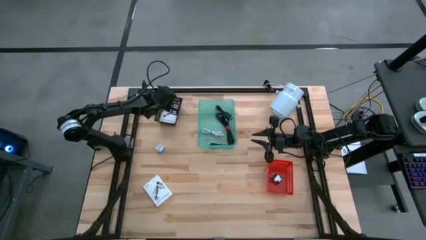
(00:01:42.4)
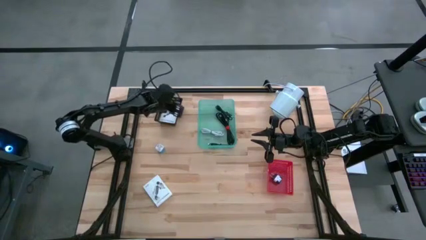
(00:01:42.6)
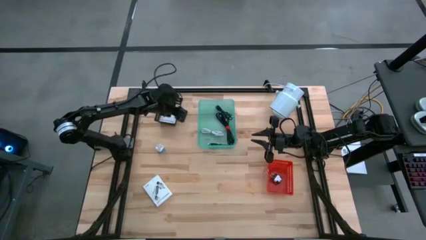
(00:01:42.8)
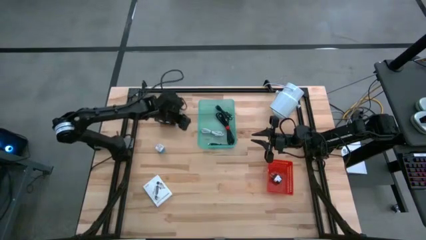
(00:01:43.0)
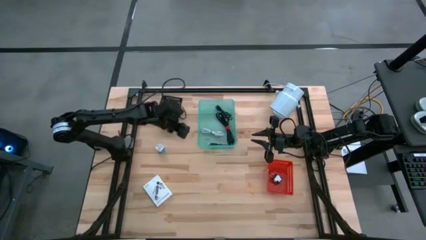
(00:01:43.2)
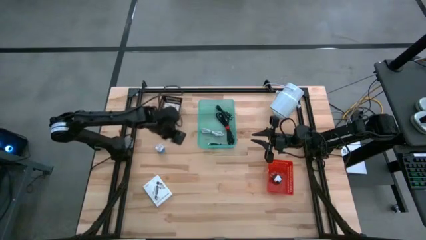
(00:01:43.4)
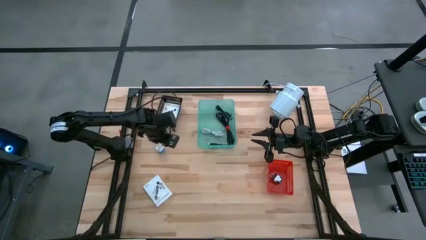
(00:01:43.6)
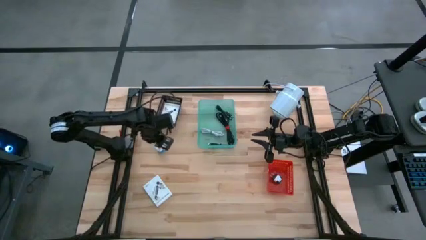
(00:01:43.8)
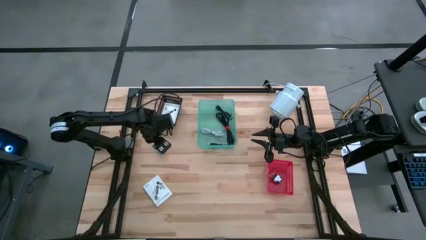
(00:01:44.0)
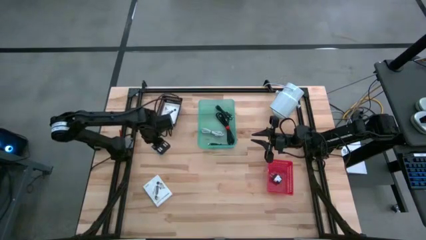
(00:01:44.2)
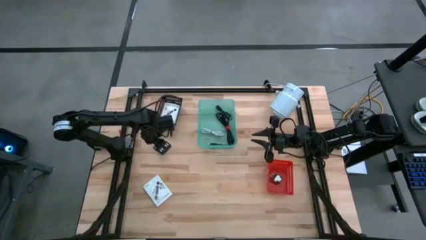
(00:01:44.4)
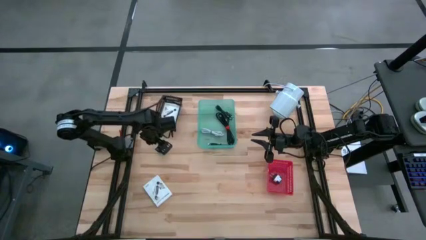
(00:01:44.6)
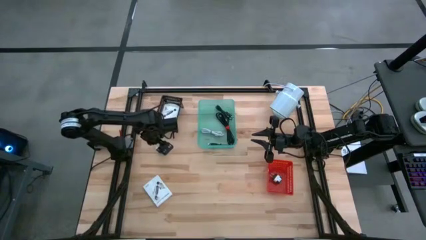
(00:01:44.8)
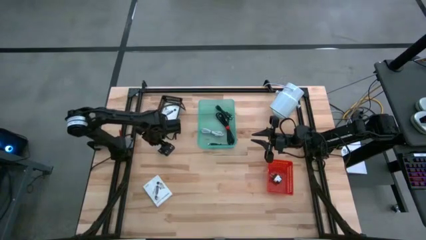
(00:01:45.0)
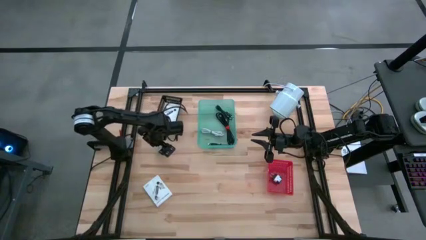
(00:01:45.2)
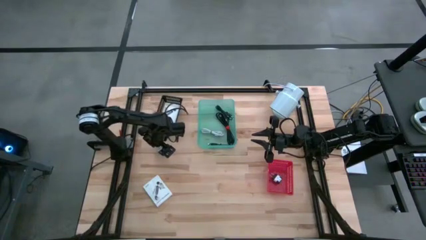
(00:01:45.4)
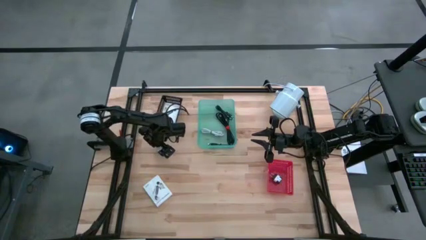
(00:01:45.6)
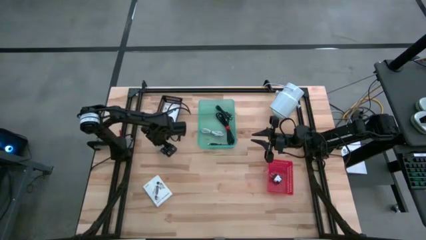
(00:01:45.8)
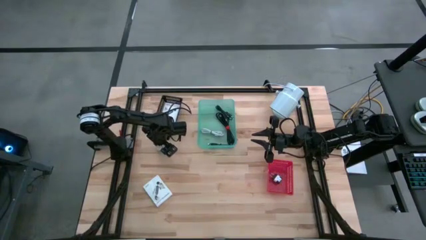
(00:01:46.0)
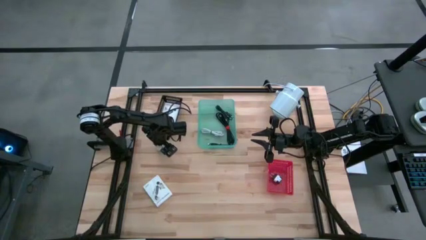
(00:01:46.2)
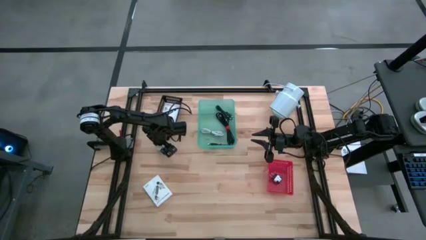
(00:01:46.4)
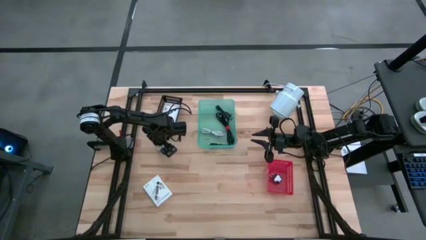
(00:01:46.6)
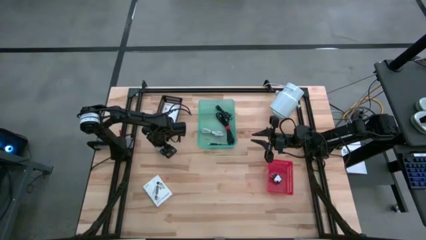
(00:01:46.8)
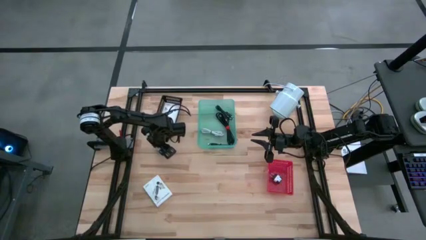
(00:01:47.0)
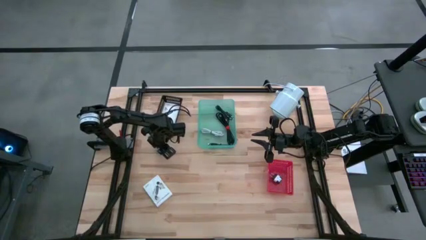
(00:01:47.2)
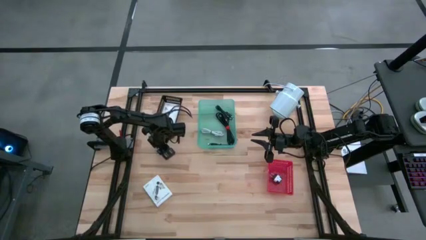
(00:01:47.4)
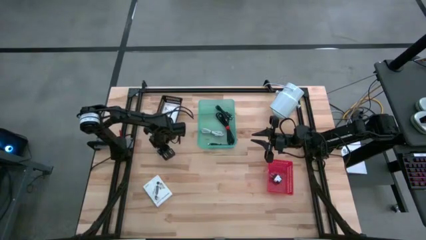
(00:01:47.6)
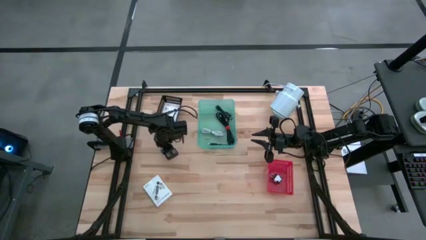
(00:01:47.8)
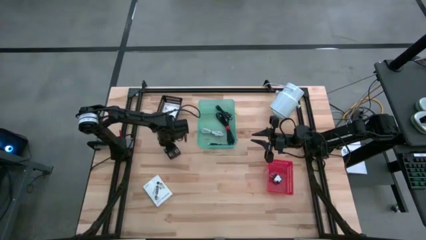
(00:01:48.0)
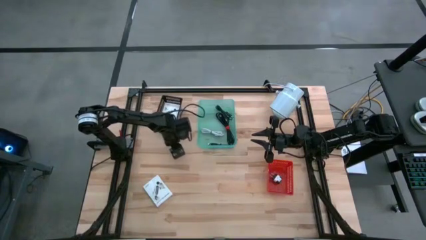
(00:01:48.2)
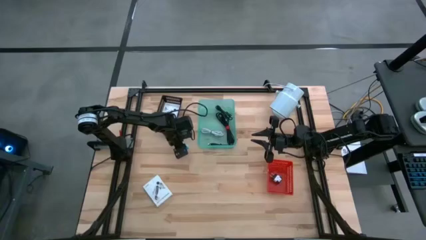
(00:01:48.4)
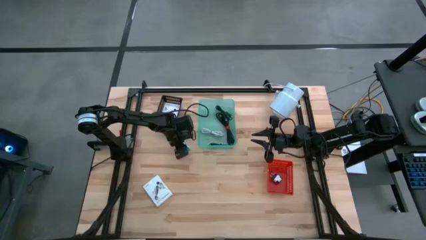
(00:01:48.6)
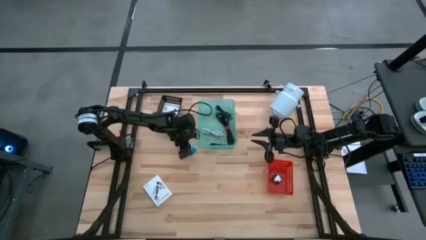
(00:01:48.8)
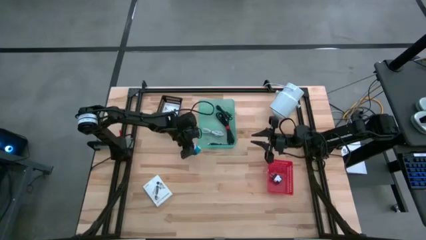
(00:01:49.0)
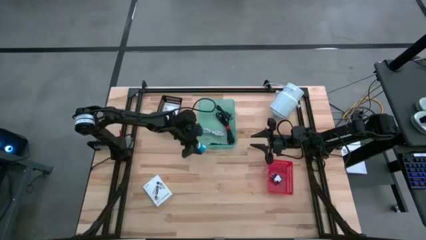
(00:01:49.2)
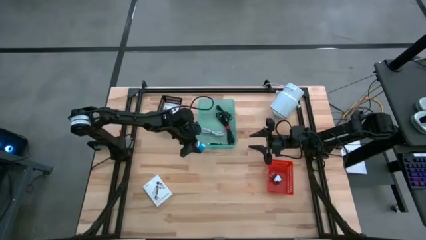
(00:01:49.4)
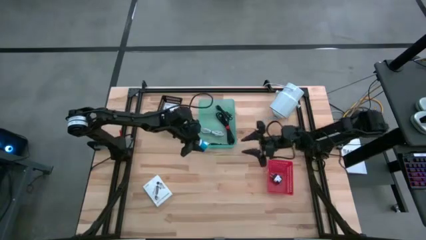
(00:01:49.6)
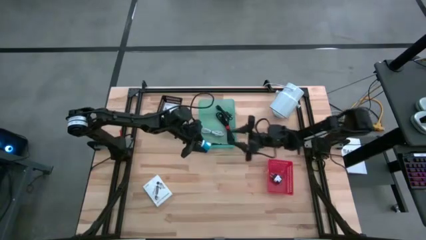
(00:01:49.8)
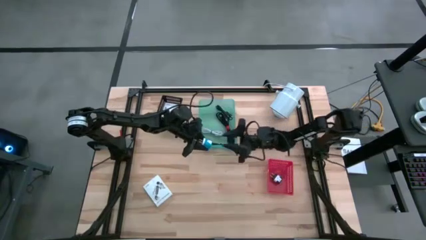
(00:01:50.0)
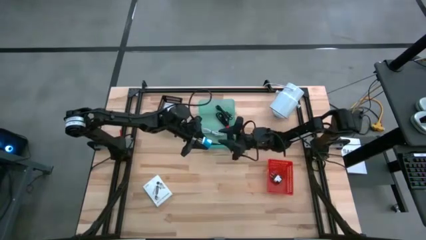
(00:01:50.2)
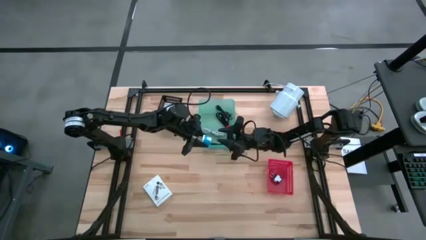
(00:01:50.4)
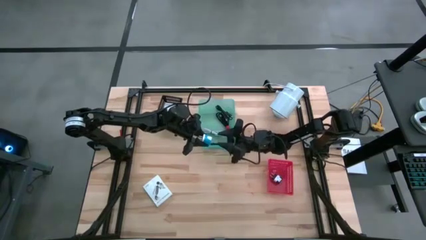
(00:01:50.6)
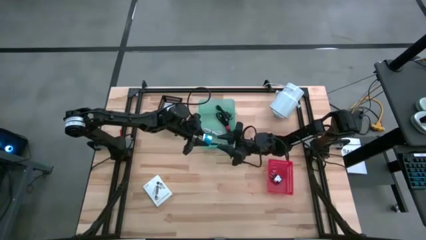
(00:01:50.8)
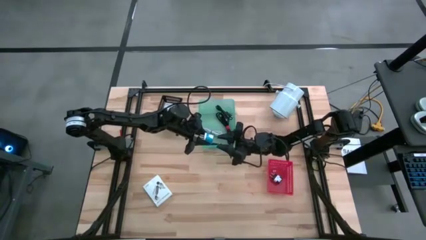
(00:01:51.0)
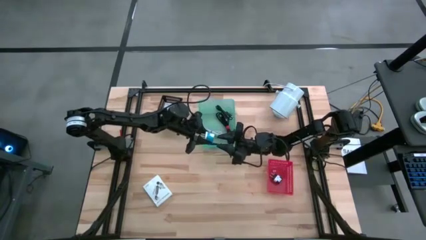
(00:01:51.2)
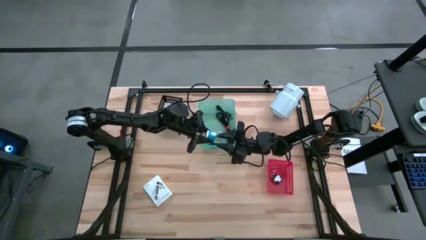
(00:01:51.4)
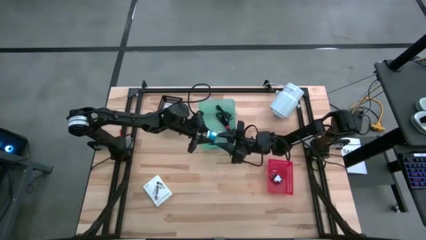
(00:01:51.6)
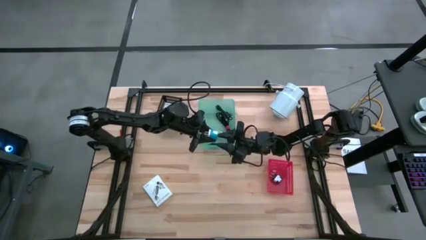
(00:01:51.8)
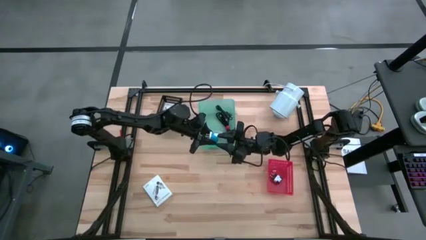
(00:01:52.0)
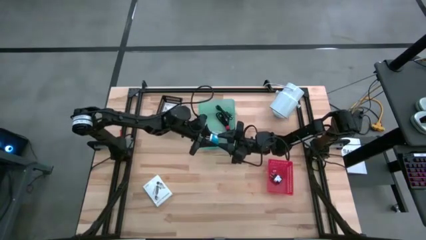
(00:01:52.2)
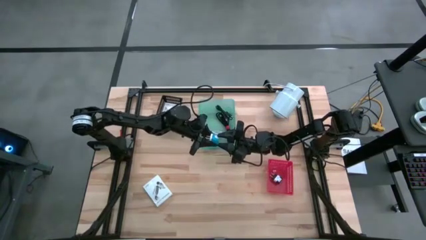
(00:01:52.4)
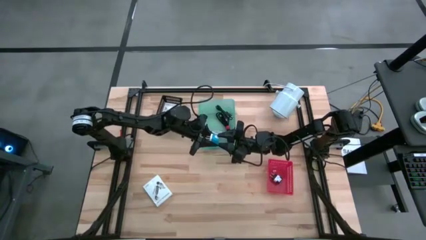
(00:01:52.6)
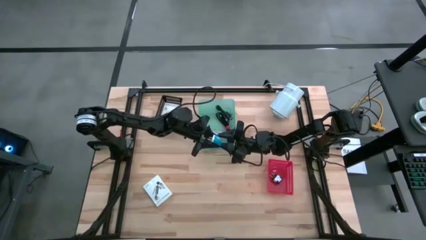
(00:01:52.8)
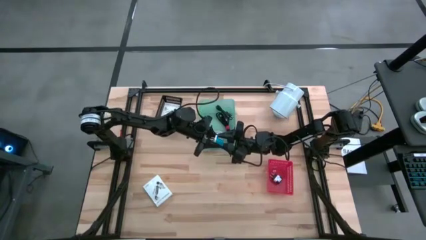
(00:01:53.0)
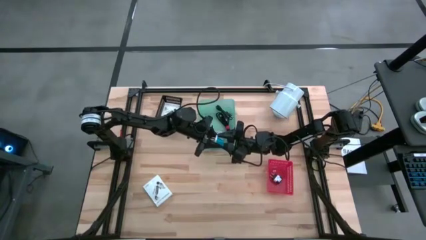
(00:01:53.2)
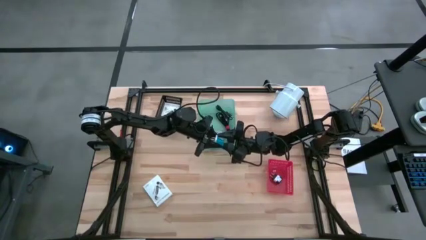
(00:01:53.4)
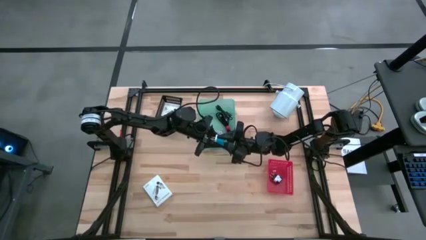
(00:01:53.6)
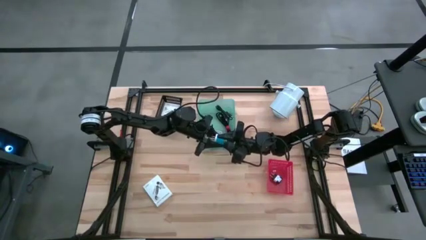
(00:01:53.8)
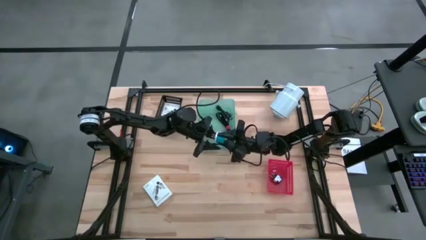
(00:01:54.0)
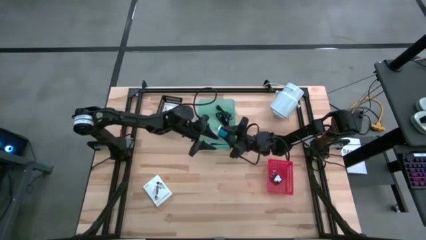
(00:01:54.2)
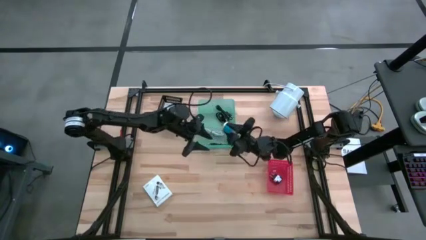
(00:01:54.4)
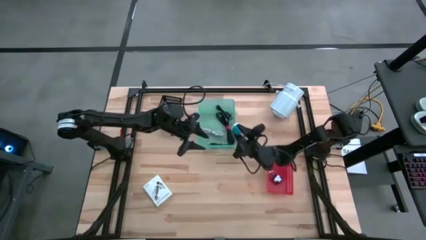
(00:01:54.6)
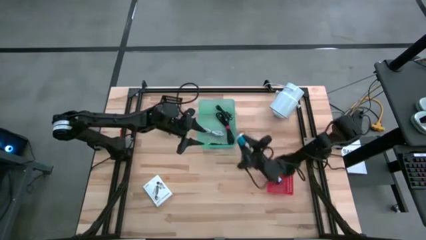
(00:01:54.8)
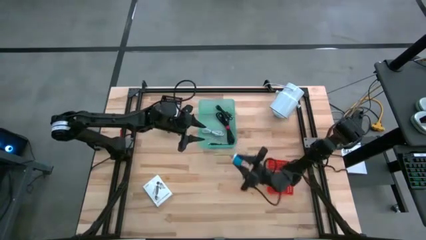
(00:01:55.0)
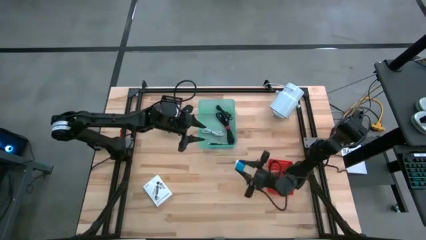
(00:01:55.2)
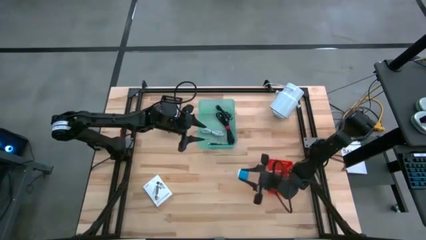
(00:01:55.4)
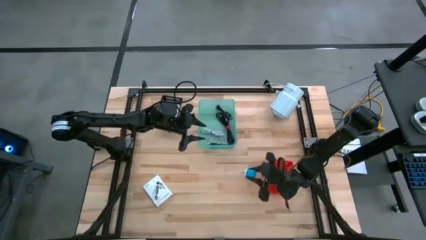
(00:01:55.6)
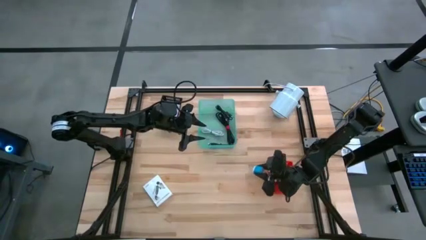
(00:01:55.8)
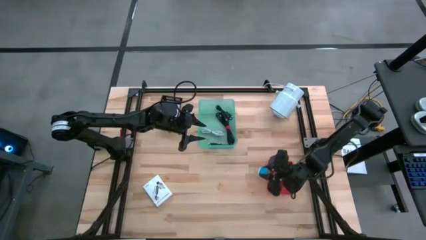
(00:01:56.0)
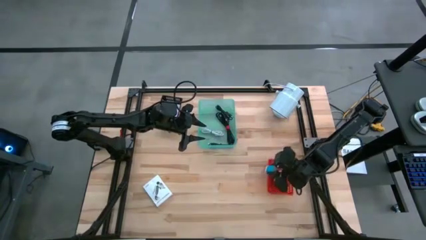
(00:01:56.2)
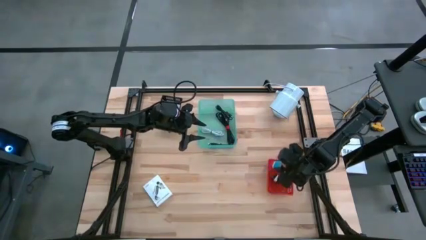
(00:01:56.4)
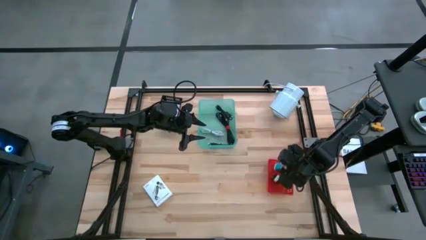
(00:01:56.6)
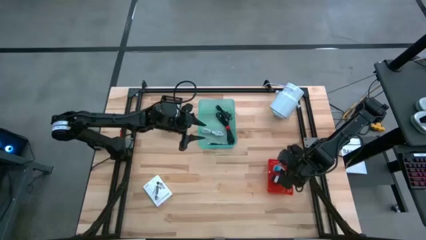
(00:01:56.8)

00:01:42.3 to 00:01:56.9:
Task: Pick and place items into bin
Put the blue charger adapter into the red bin
